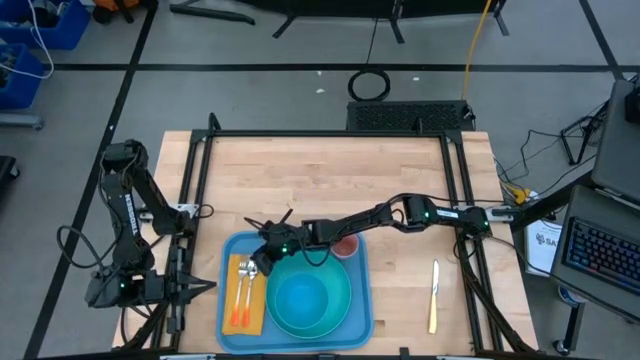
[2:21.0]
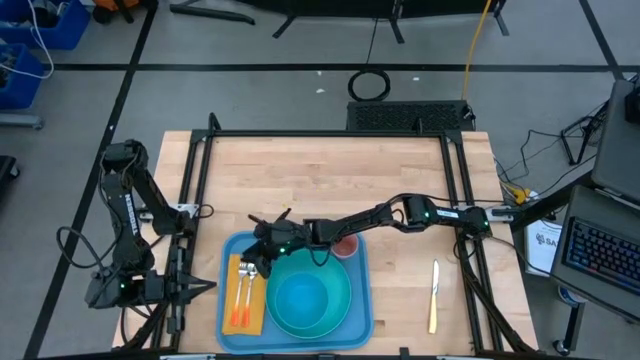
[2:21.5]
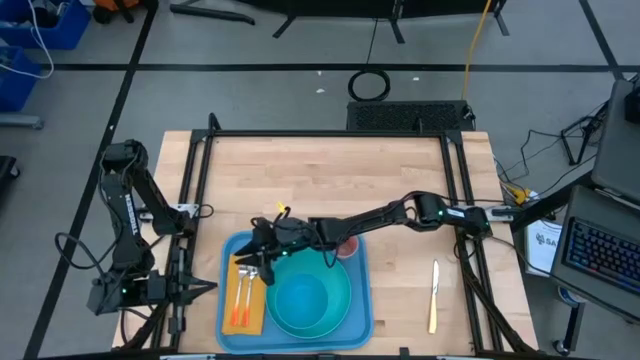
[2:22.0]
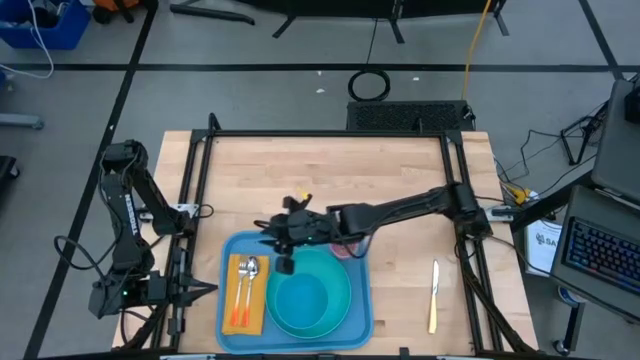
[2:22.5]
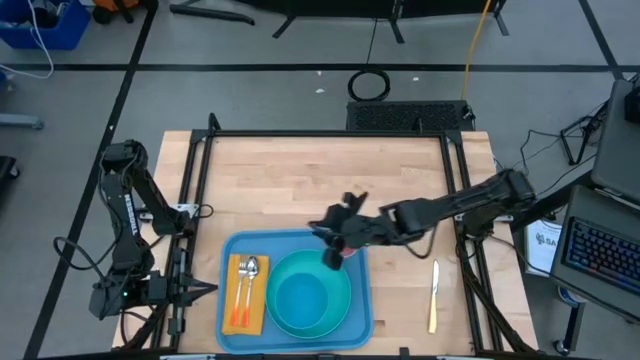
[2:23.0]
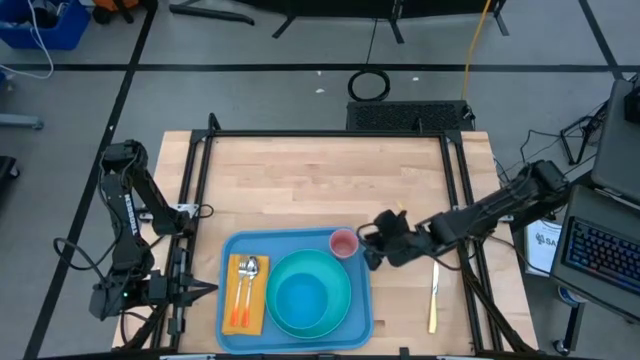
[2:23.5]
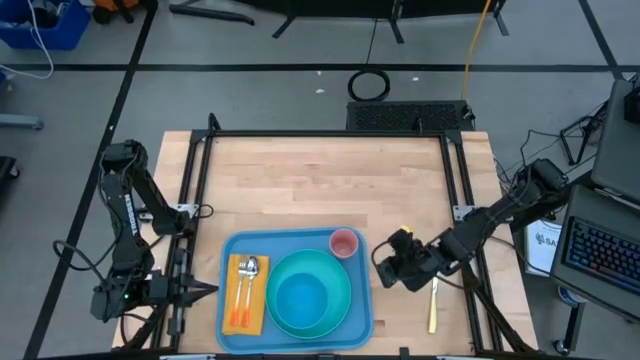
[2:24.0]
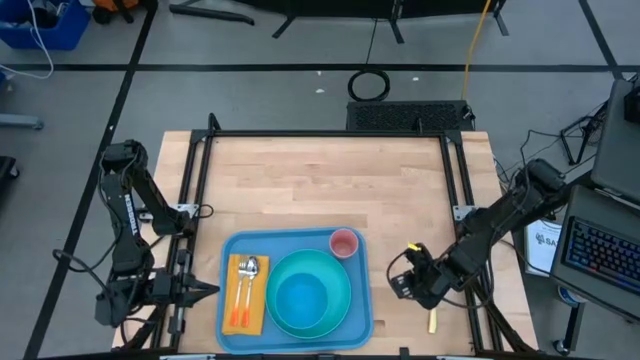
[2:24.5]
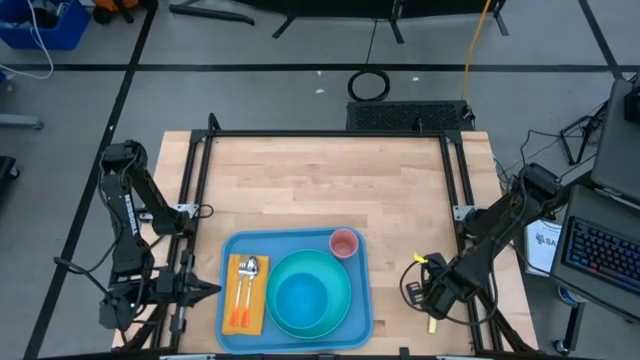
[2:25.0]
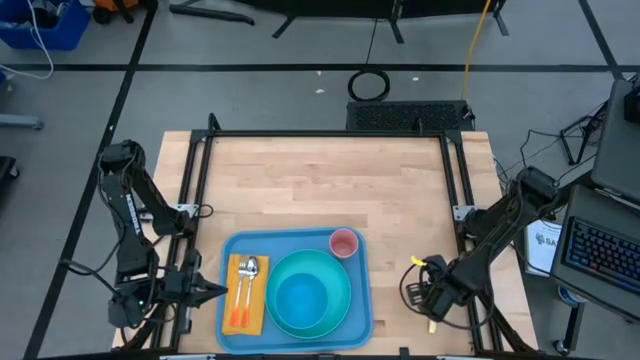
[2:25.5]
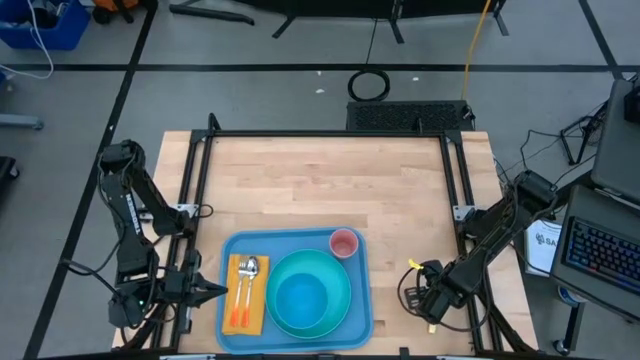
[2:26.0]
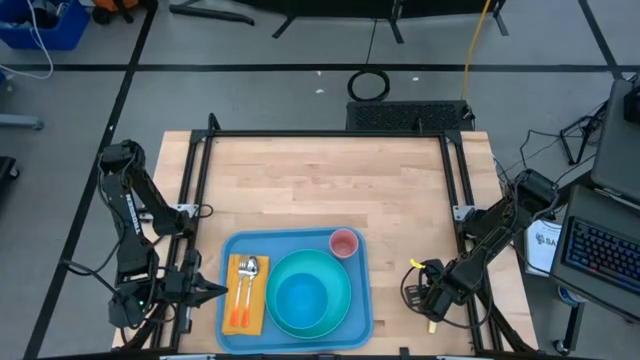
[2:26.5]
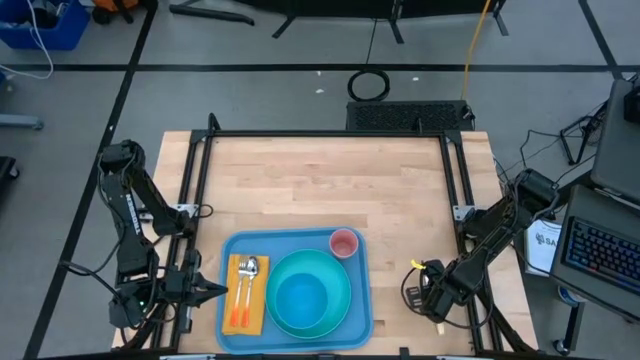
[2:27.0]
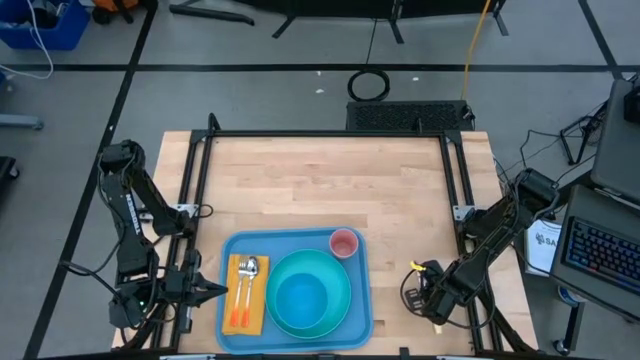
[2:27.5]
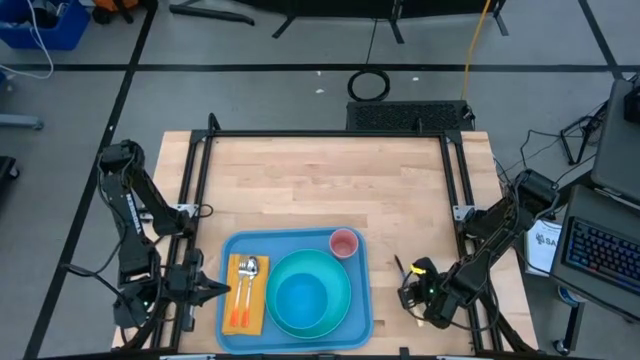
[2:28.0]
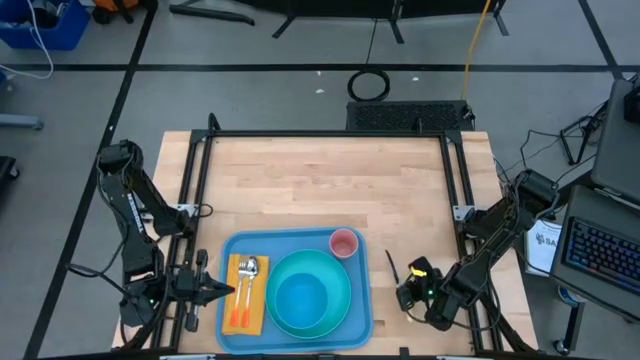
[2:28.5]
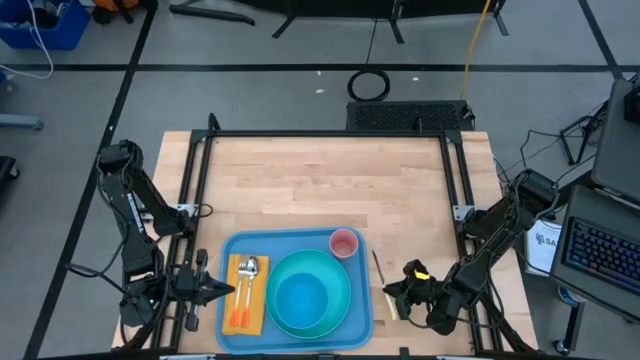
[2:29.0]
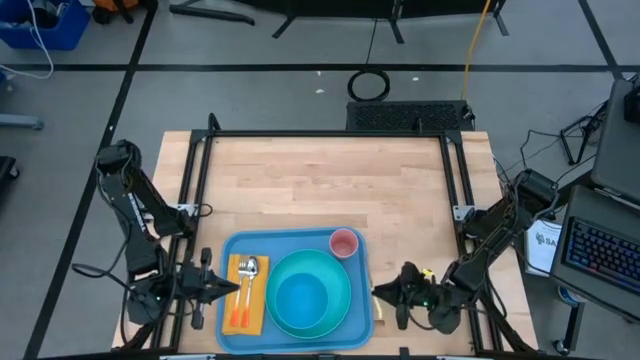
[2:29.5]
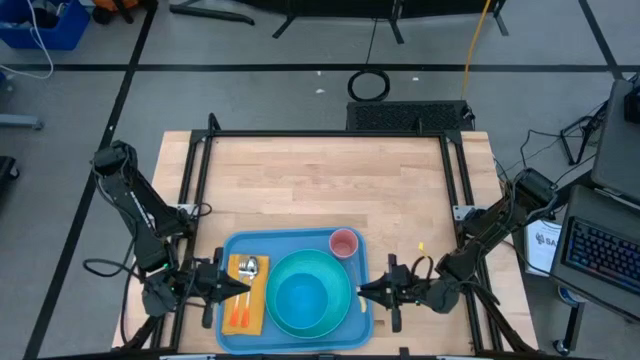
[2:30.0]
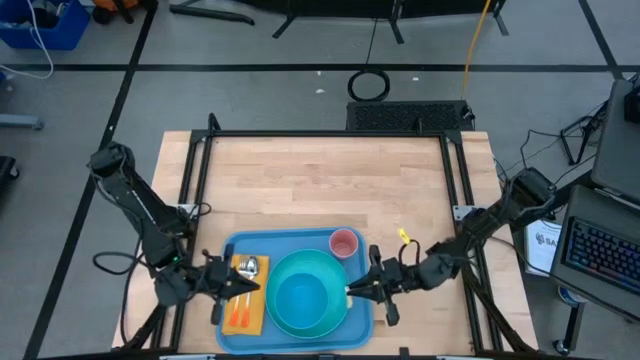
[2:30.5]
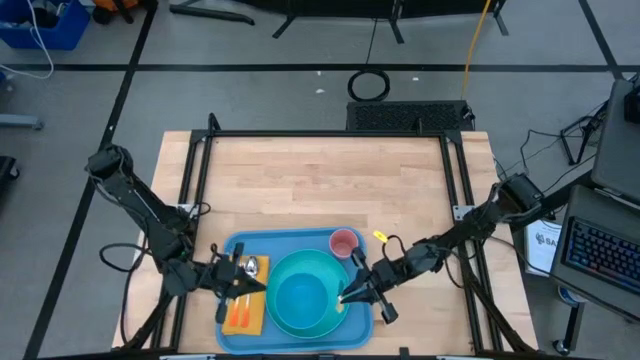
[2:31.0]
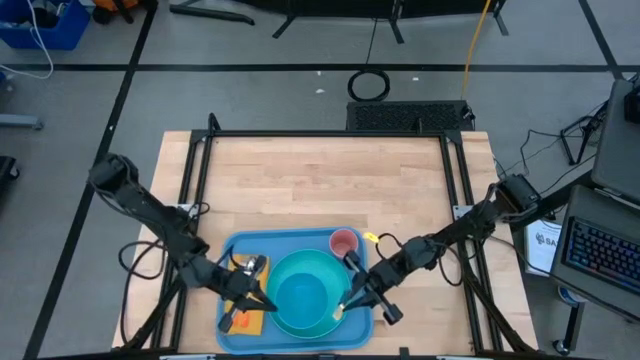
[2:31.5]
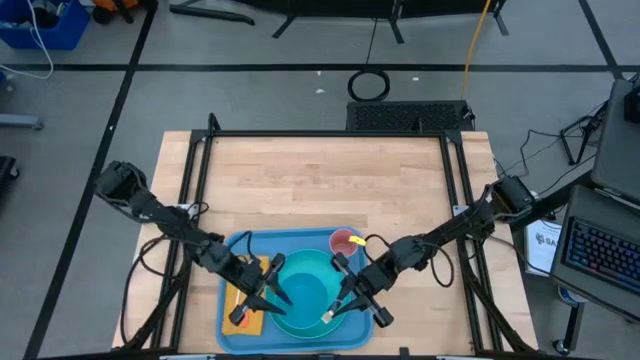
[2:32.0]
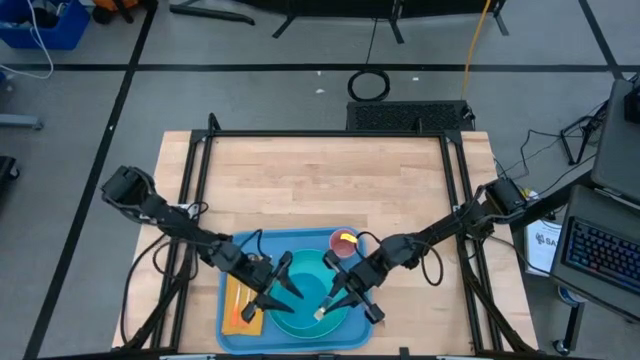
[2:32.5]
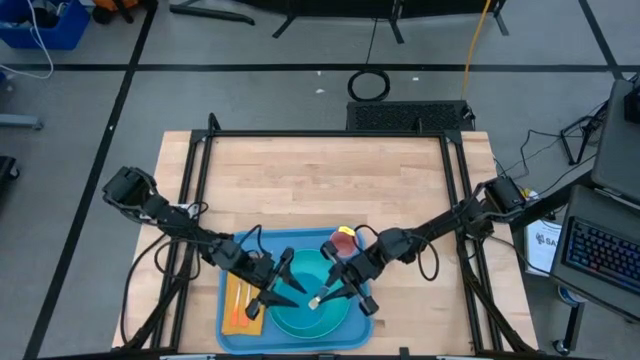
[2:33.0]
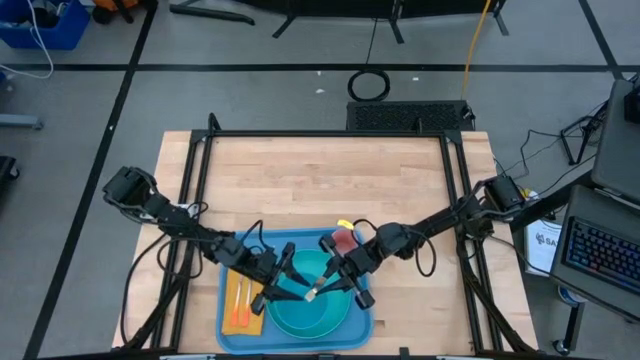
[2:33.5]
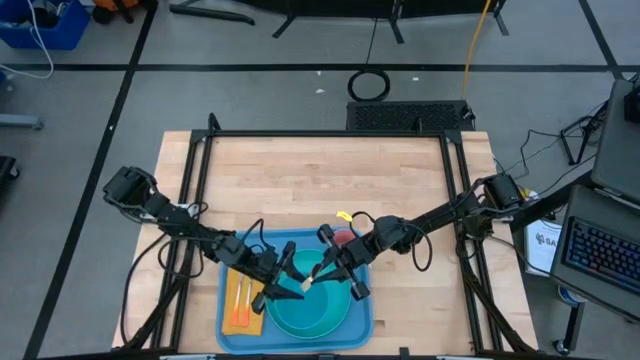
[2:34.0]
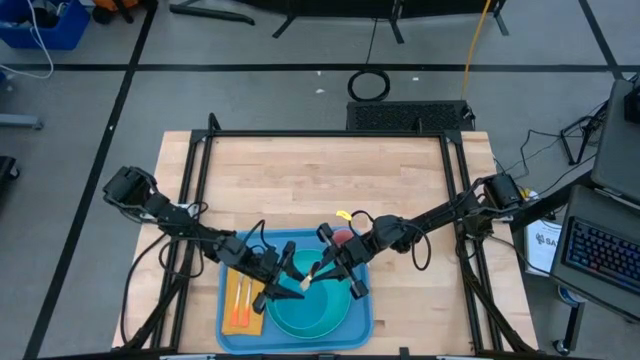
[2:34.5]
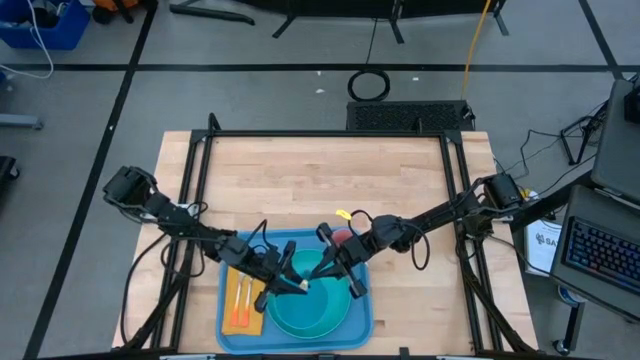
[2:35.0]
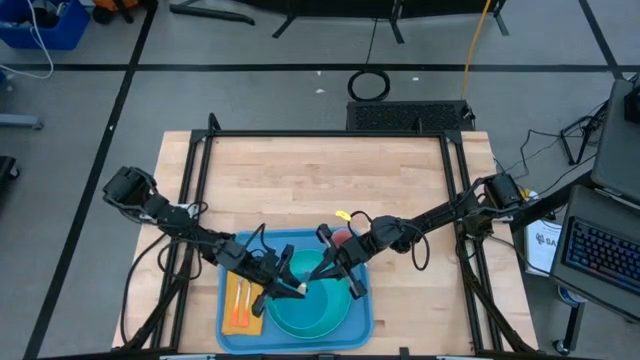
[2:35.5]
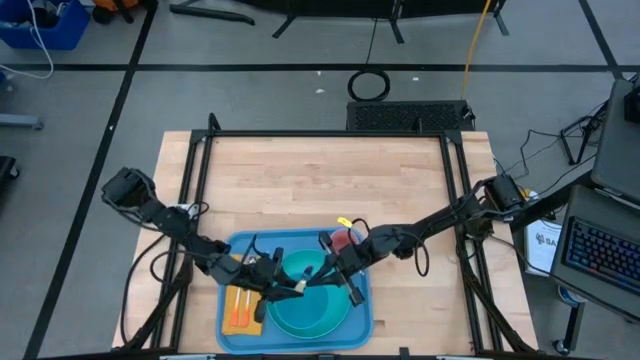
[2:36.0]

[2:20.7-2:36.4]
Task: Set up tray
Put the yellow table knife on the yellow table napkin to the right of the orange spoon

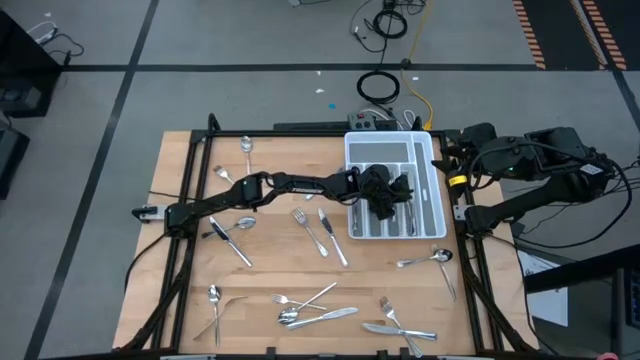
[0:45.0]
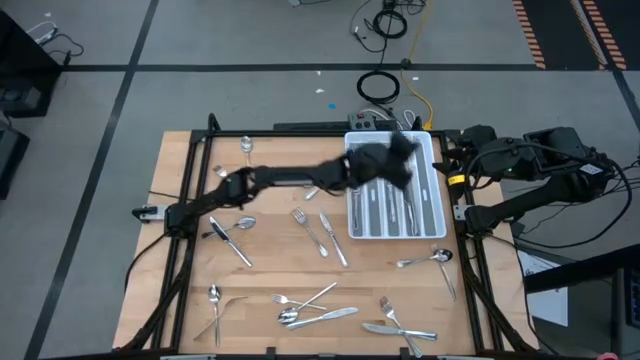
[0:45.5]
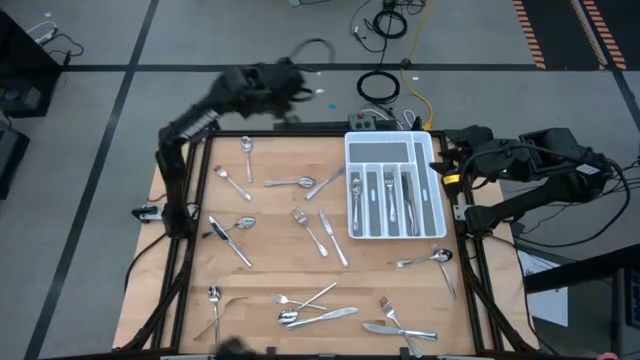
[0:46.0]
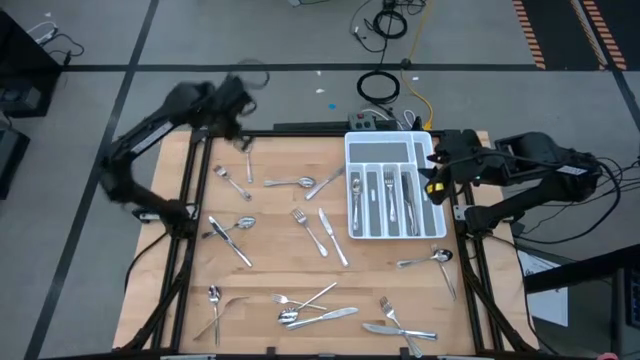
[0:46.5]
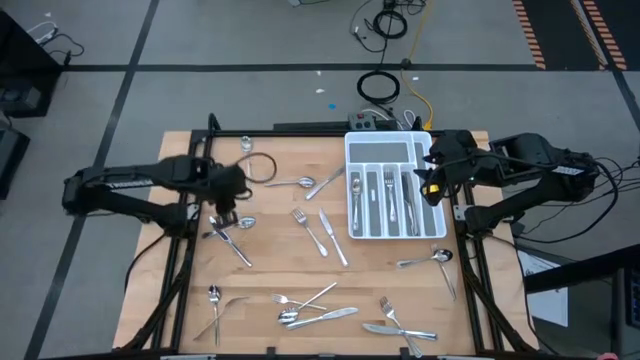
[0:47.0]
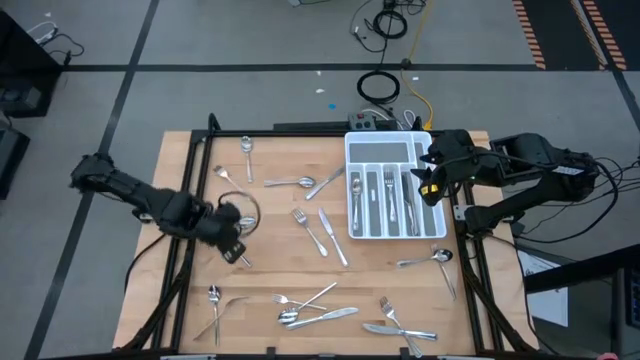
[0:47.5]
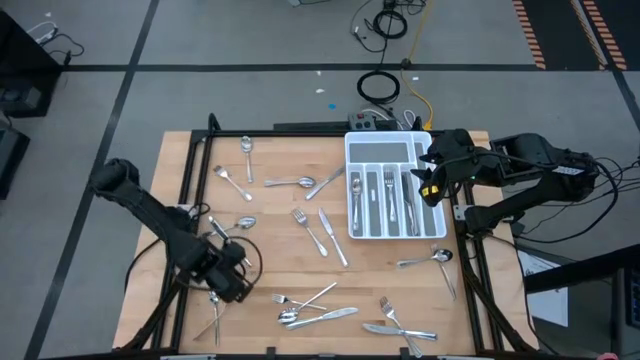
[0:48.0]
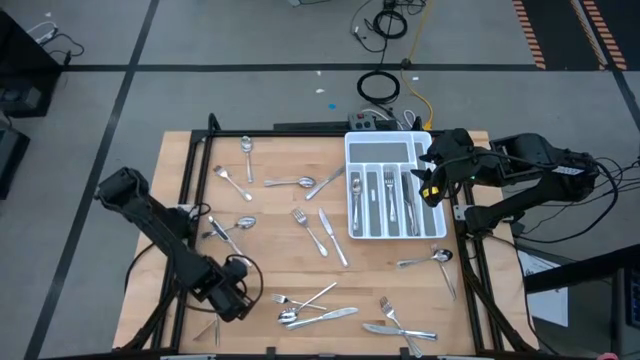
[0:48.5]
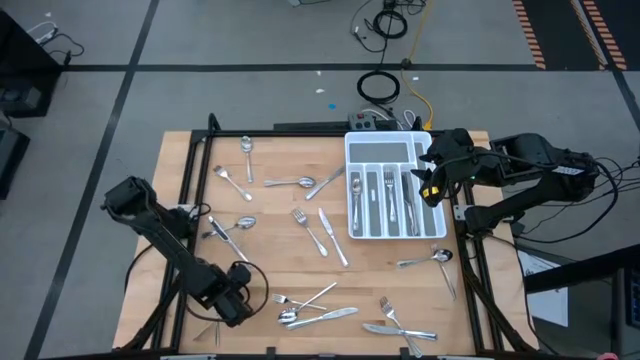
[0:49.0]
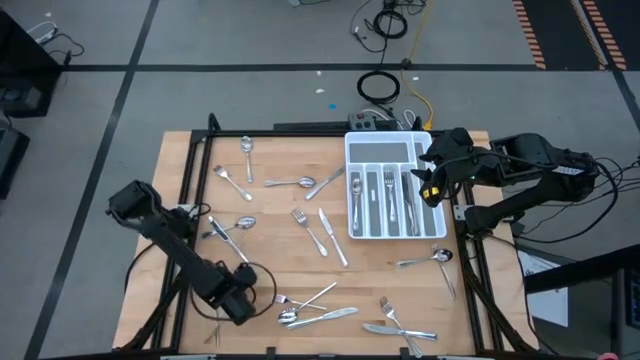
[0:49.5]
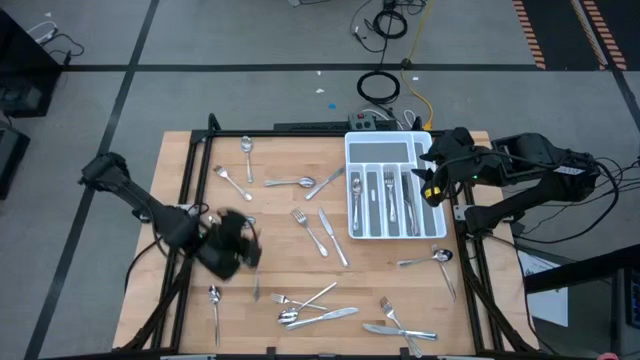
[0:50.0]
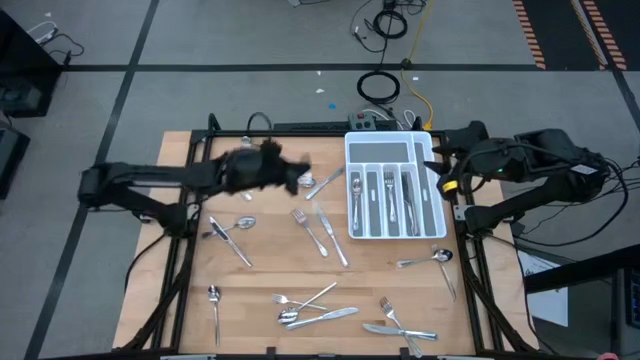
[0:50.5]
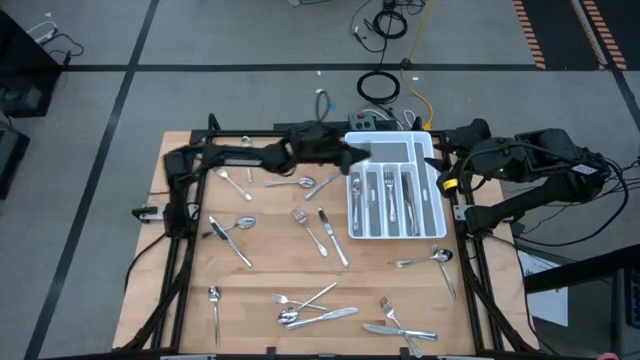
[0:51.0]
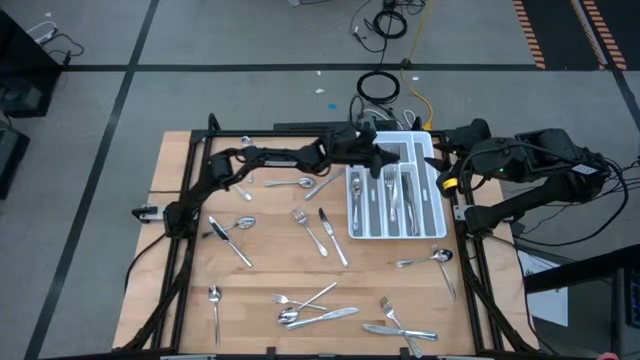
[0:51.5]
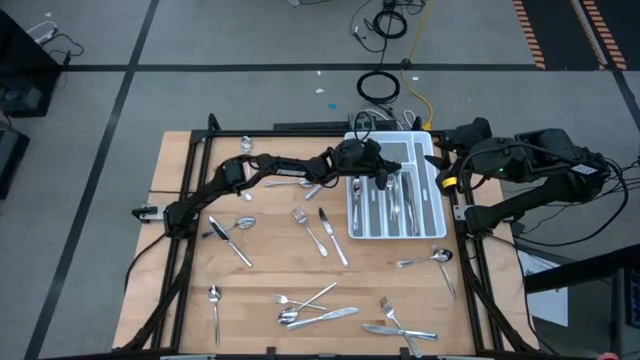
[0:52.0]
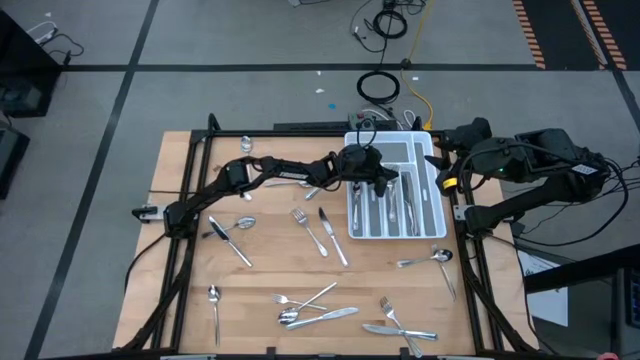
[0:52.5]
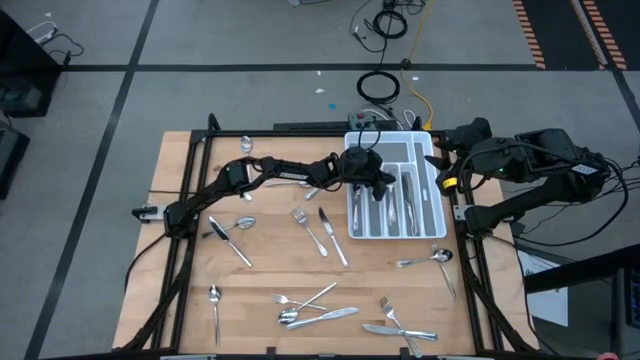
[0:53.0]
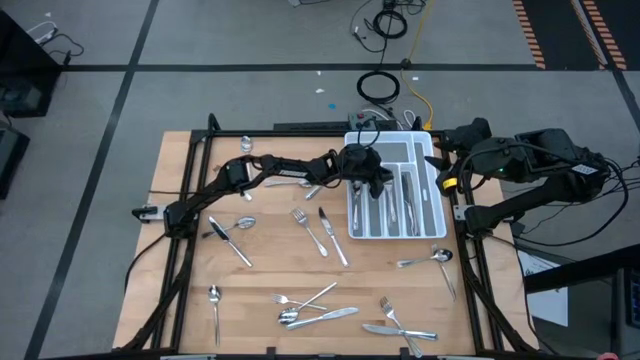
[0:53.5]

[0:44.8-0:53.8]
Task: Sort silverware
Put the silver fork into the white silverware tray
